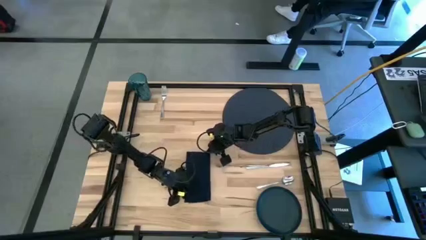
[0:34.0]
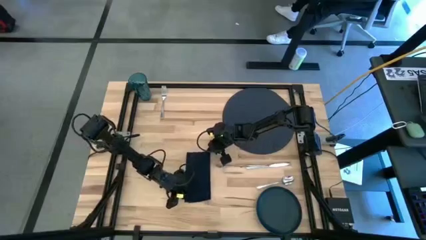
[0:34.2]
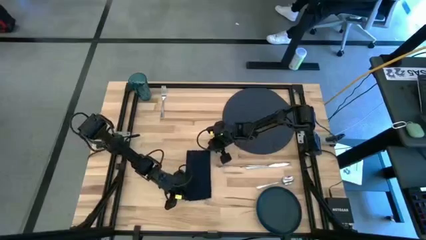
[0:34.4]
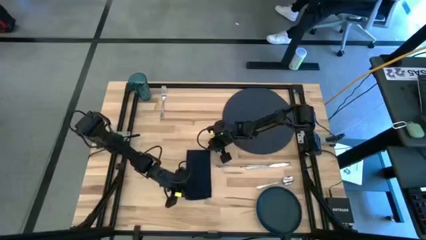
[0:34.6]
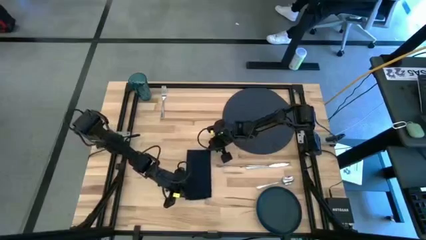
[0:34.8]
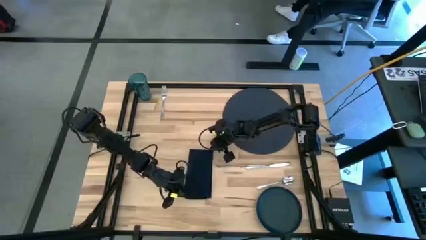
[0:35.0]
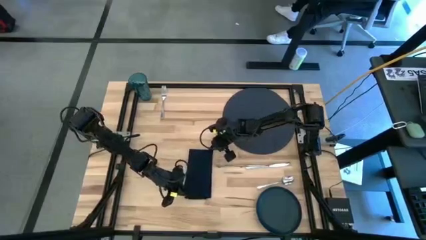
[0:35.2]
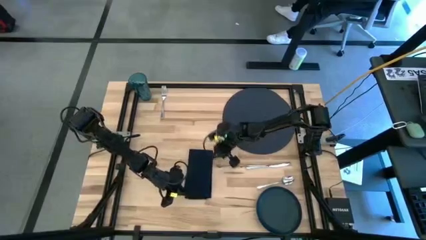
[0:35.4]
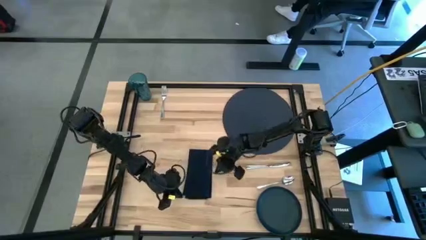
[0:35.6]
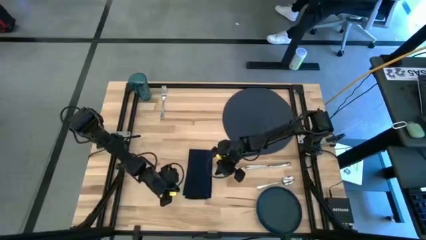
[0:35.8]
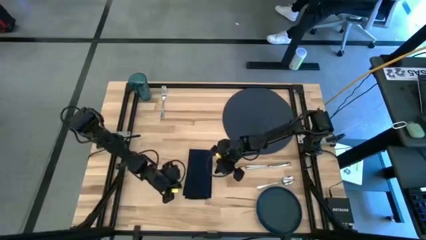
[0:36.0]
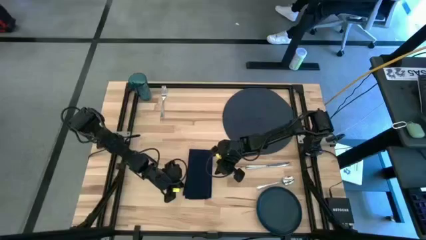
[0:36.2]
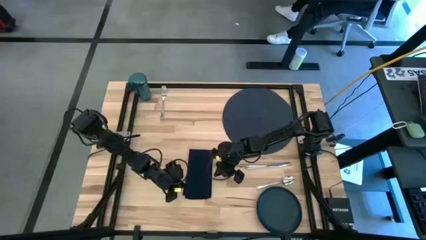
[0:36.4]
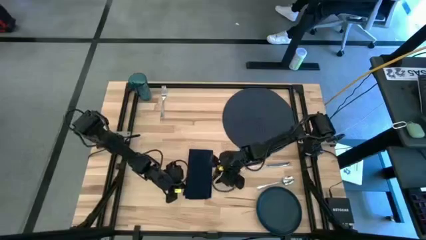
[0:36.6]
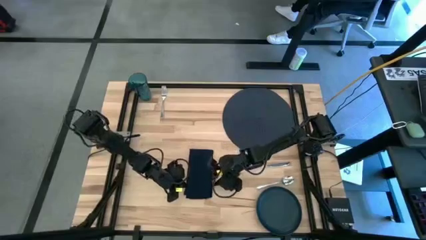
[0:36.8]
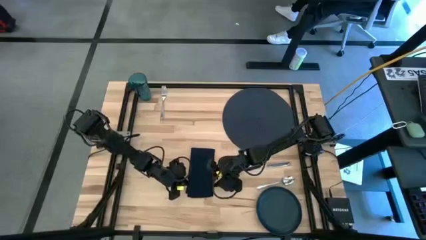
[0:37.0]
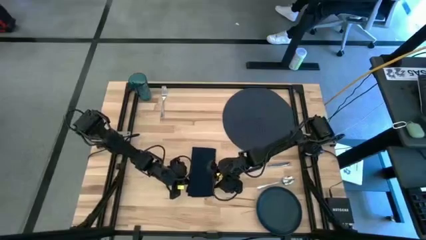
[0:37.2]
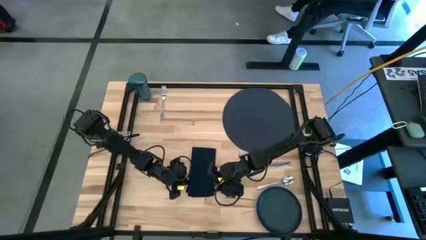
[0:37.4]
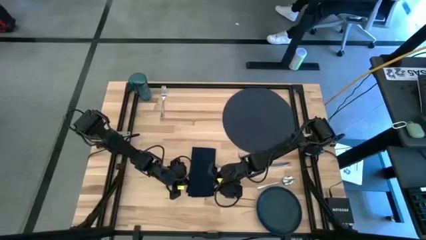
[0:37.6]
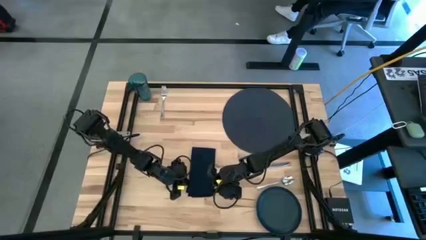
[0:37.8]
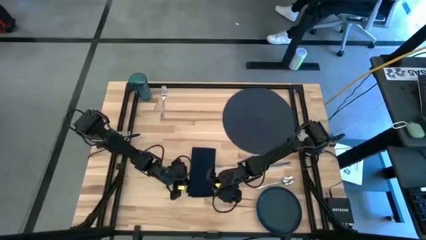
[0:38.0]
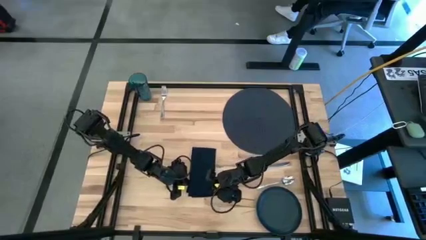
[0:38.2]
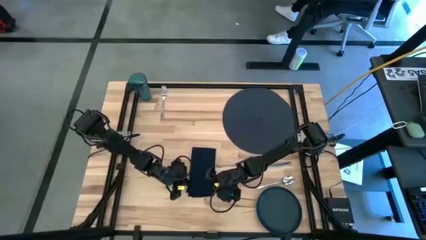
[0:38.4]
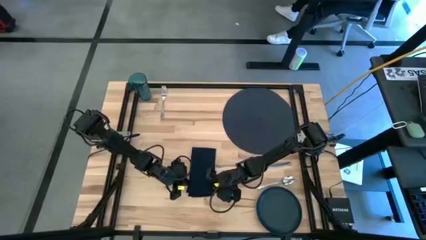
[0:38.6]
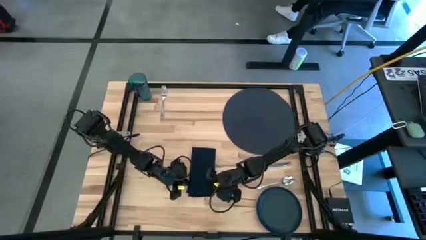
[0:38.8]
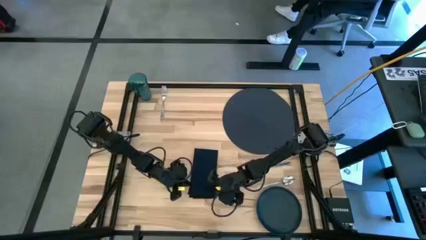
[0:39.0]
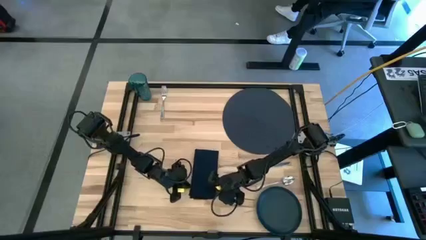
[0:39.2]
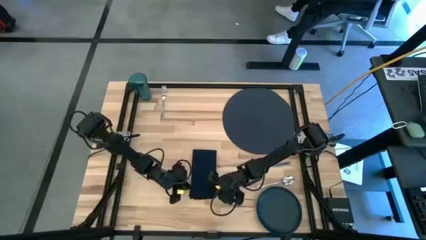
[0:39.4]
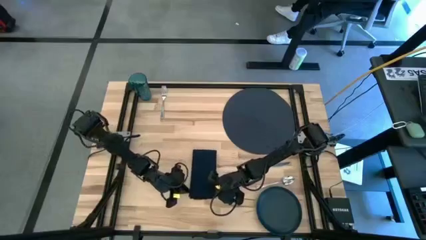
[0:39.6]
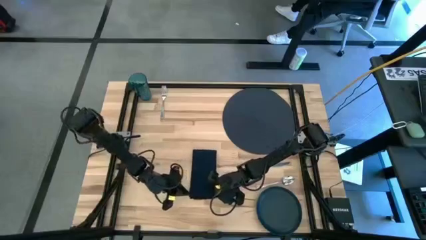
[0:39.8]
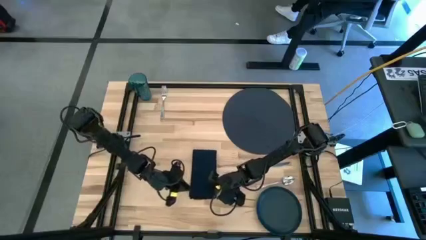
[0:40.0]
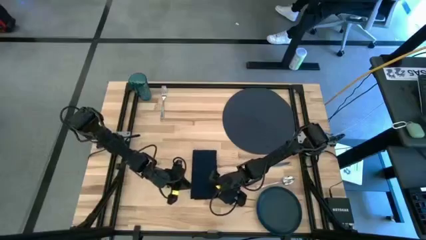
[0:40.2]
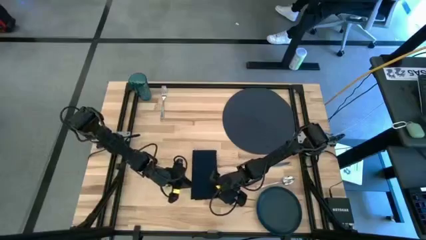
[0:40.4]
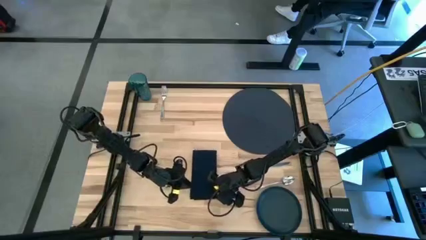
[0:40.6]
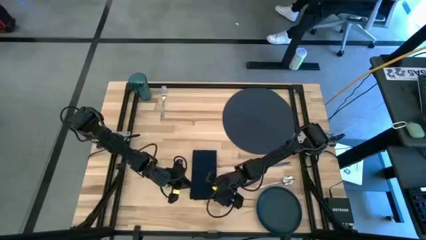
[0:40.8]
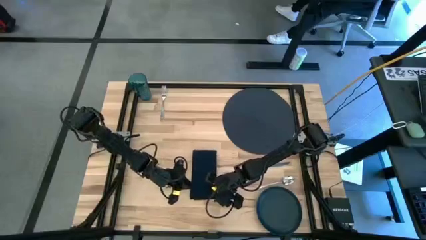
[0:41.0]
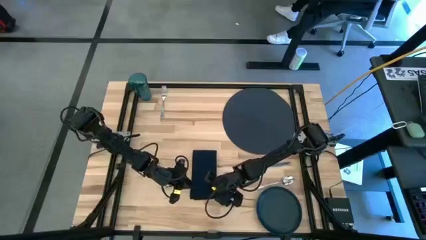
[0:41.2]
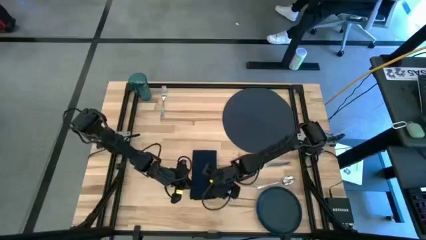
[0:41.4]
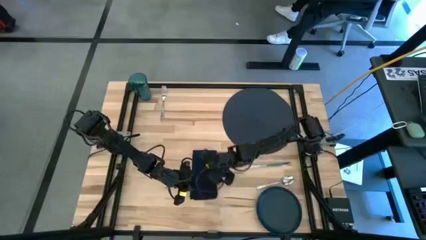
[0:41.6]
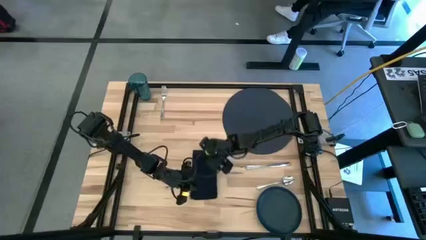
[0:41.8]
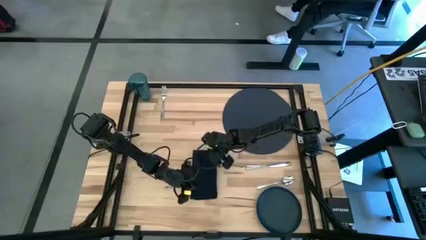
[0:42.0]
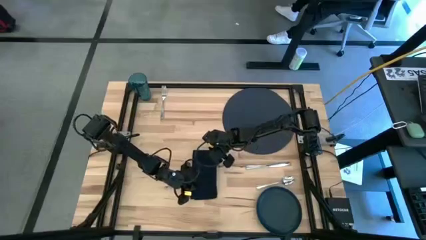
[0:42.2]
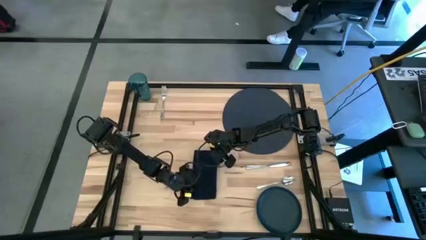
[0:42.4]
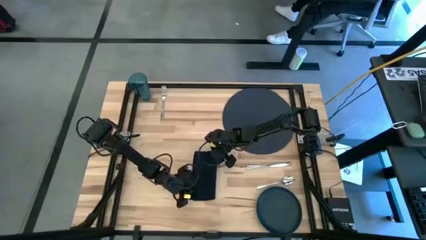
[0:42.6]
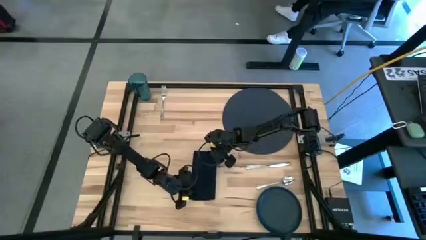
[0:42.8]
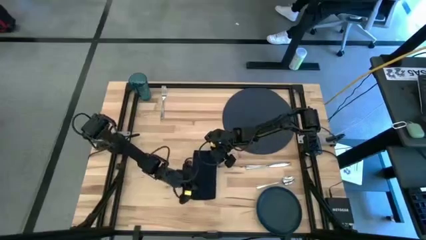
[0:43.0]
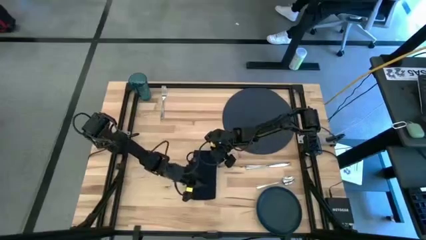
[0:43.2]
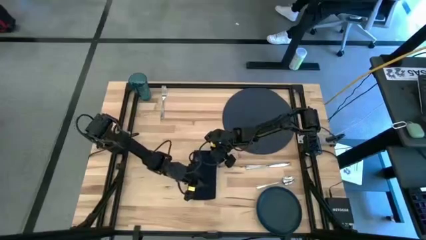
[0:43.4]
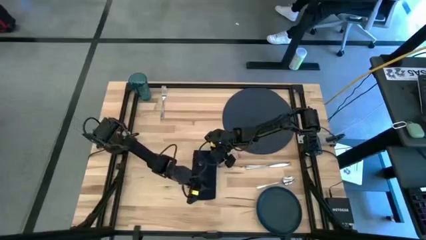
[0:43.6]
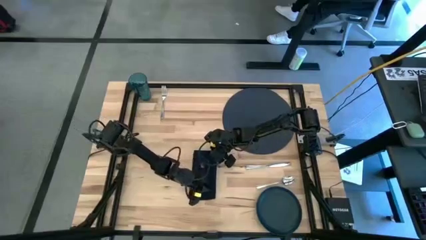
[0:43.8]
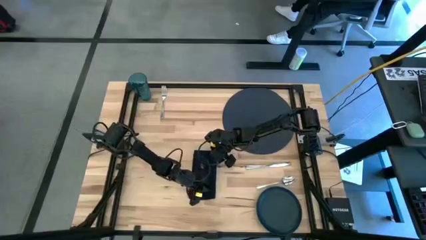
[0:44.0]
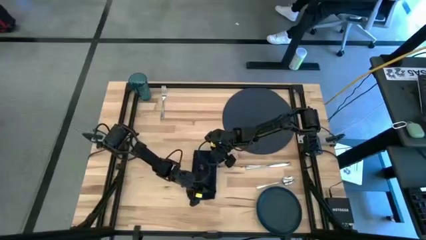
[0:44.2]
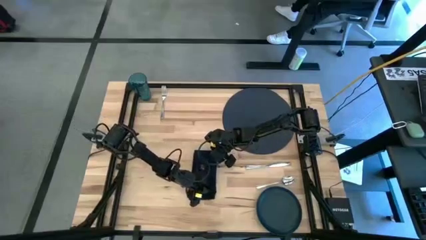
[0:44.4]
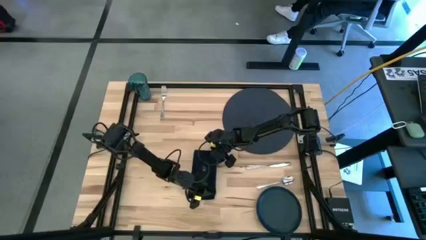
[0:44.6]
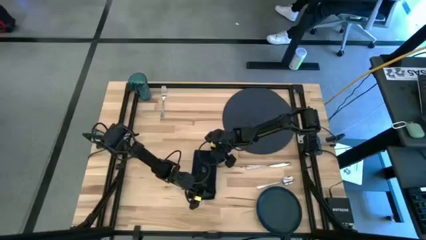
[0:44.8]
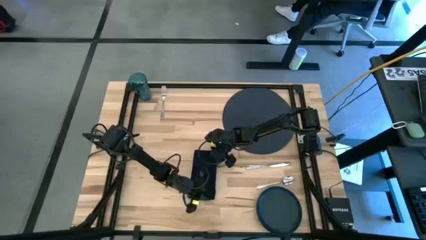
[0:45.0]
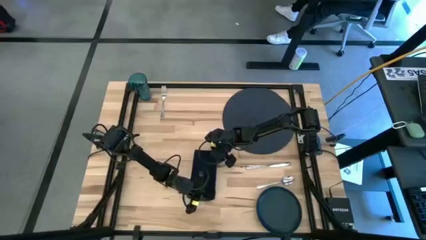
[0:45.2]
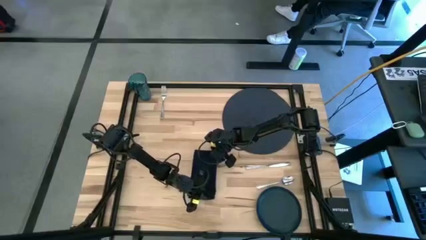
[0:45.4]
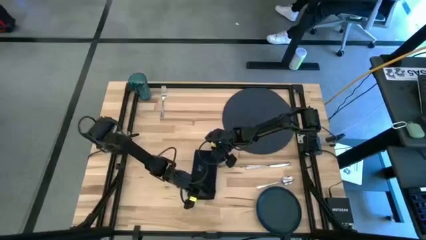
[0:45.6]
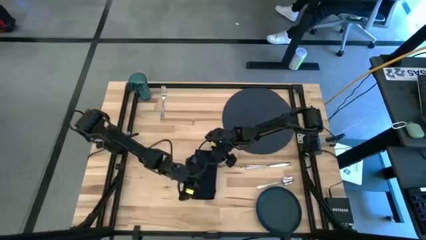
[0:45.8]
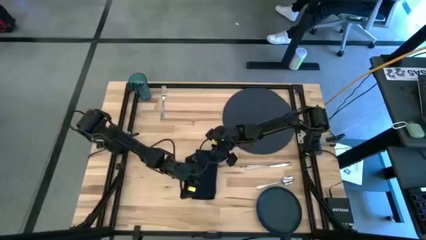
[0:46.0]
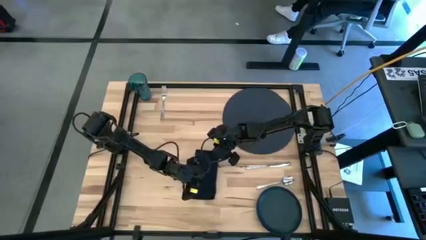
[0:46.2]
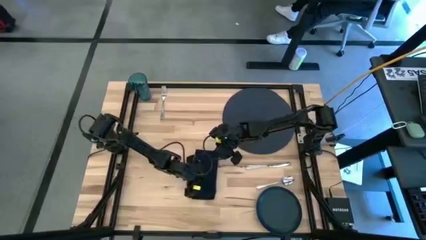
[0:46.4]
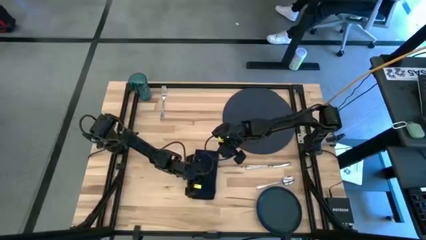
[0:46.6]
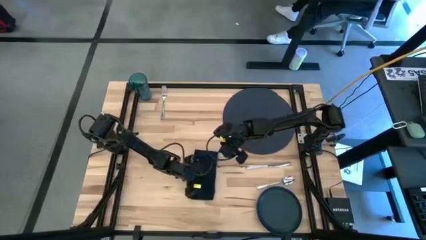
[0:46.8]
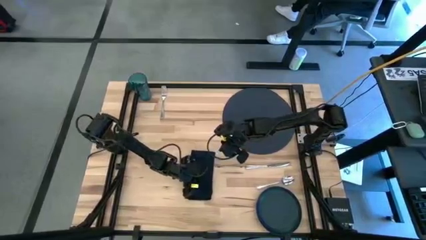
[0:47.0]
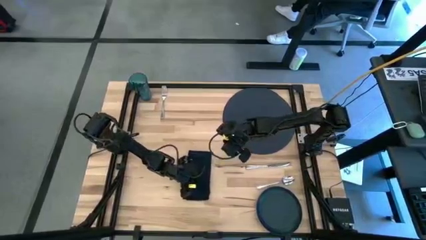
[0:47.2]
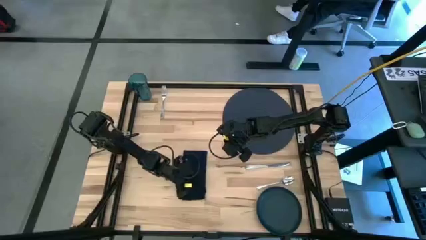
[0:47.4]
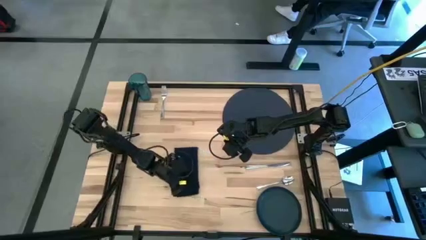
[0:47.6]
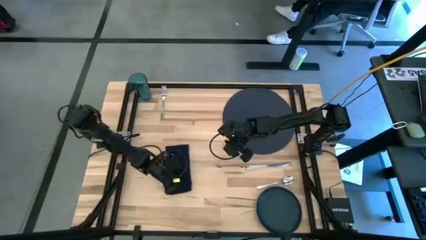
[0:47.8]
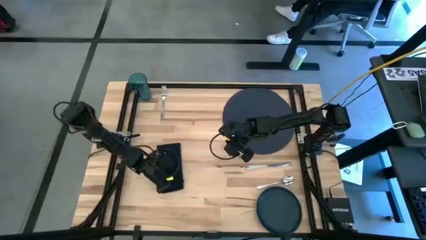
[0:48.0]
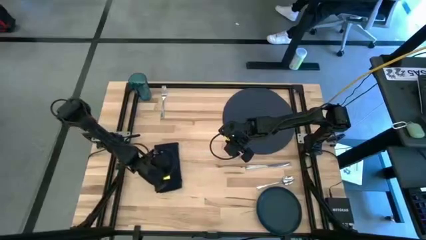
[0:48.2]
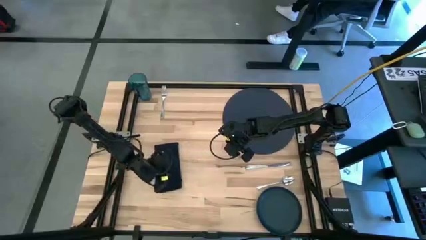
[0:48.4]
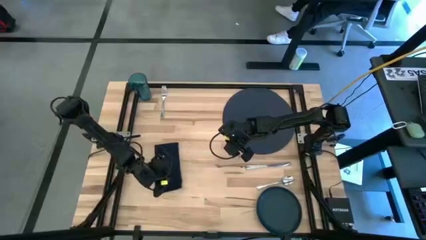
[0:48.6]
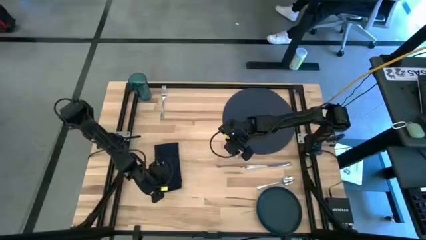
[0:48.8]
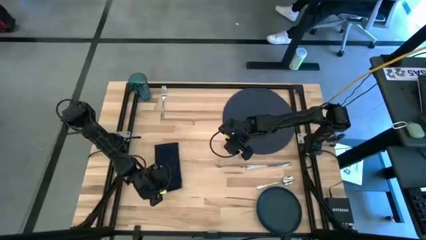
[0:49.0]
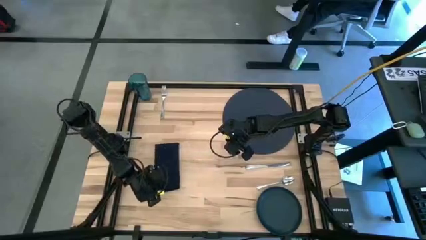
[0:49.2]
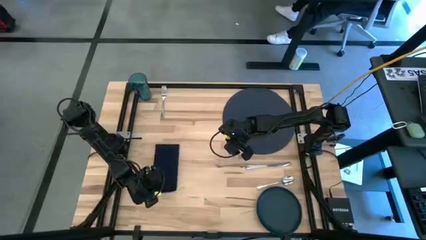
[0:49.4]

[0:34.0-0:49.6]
Task: Set table place
Fold the black table napkin
